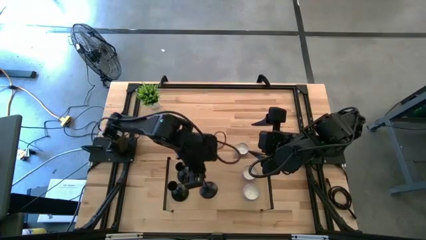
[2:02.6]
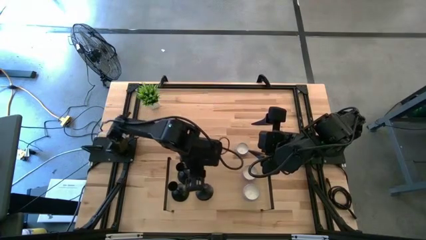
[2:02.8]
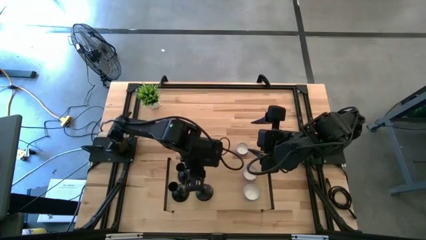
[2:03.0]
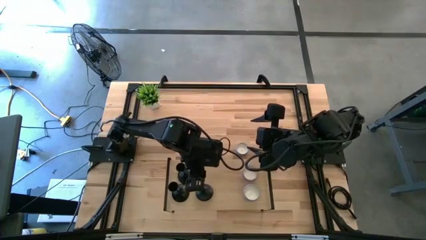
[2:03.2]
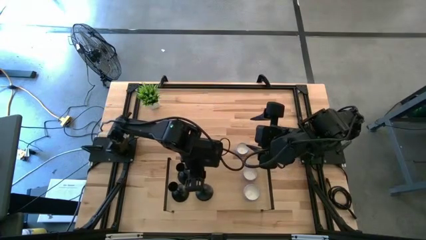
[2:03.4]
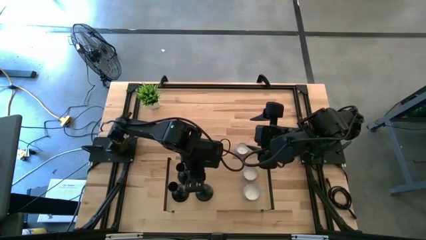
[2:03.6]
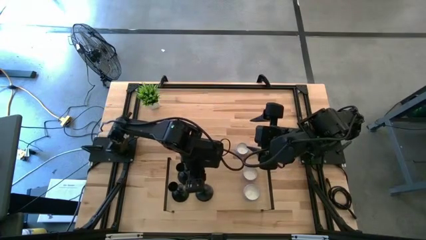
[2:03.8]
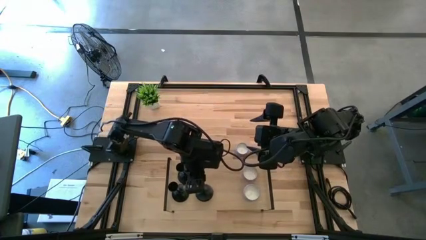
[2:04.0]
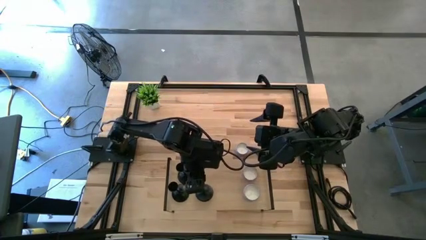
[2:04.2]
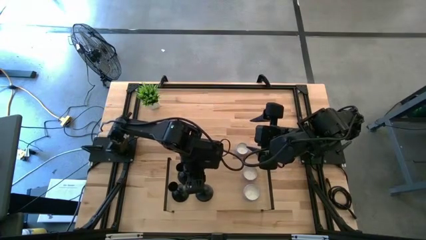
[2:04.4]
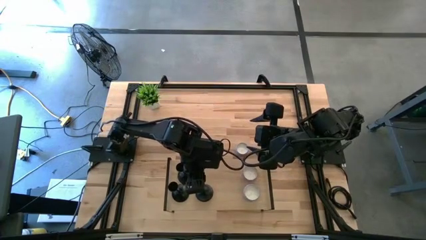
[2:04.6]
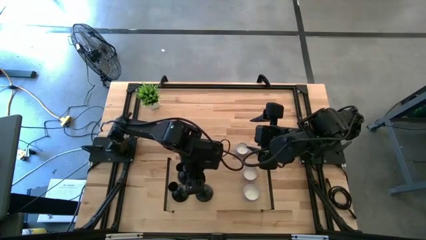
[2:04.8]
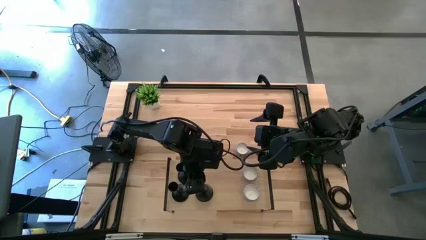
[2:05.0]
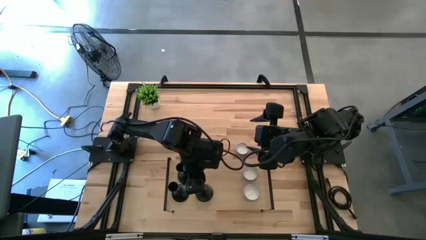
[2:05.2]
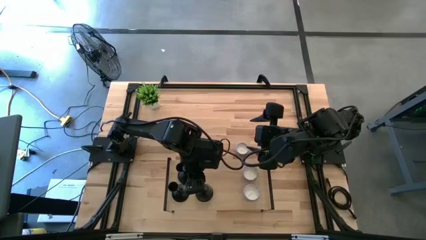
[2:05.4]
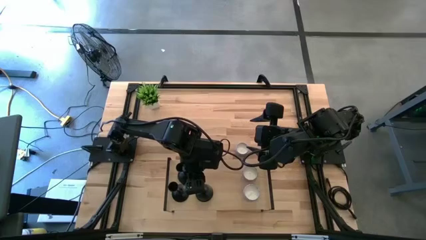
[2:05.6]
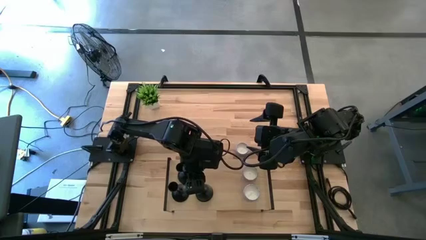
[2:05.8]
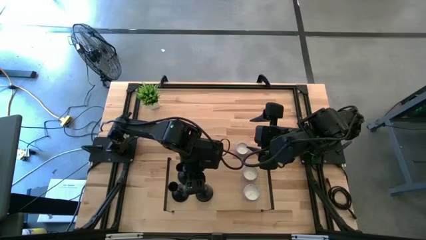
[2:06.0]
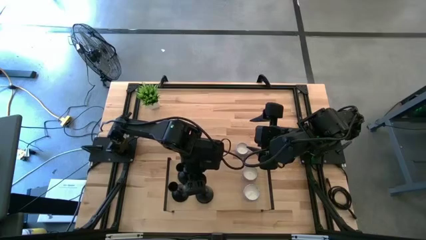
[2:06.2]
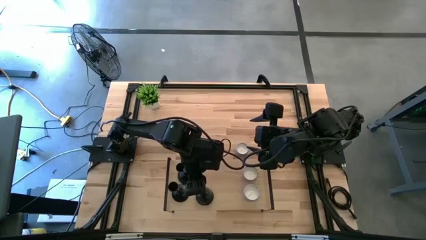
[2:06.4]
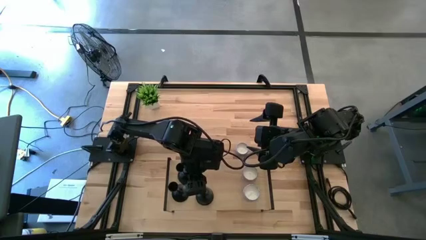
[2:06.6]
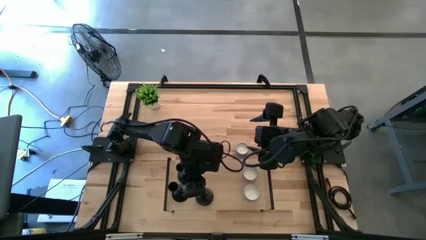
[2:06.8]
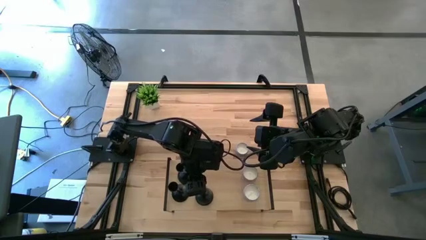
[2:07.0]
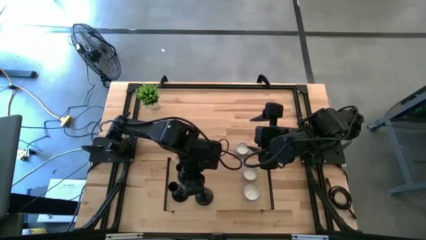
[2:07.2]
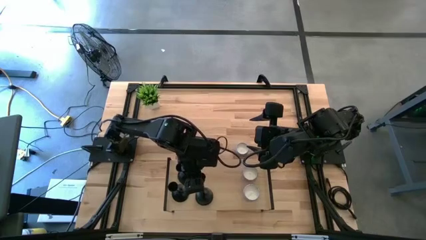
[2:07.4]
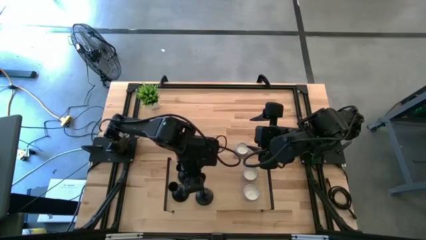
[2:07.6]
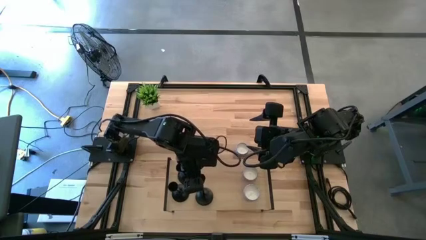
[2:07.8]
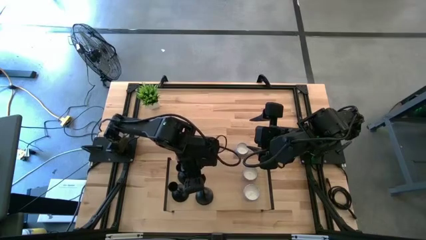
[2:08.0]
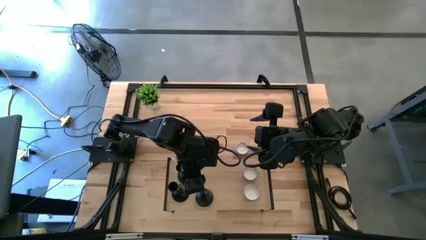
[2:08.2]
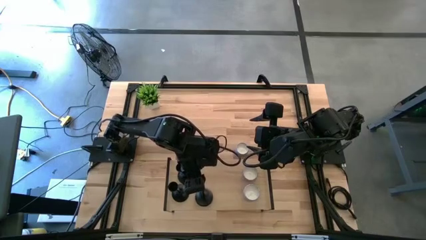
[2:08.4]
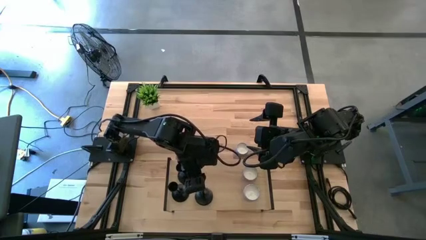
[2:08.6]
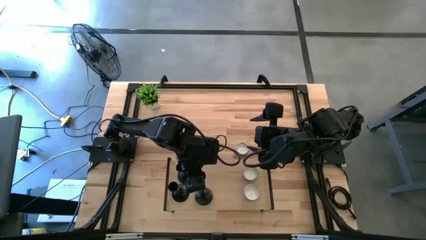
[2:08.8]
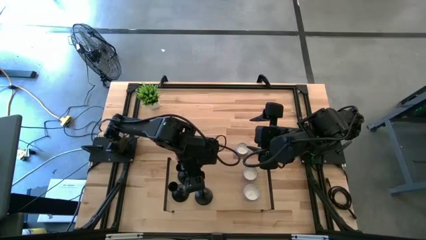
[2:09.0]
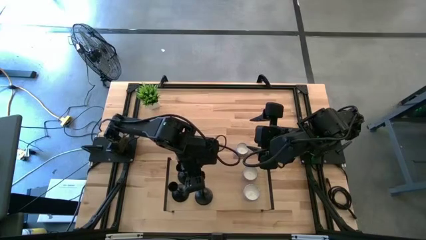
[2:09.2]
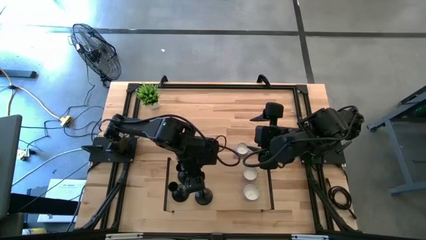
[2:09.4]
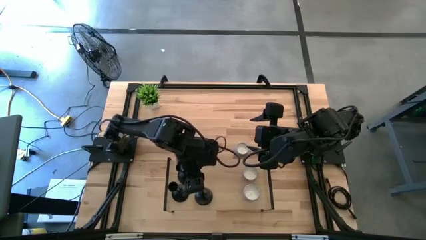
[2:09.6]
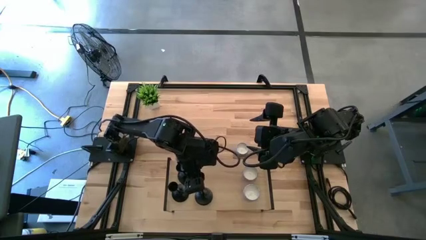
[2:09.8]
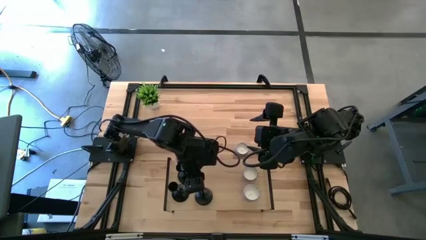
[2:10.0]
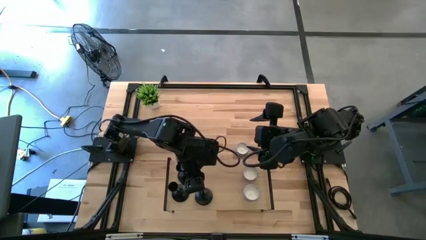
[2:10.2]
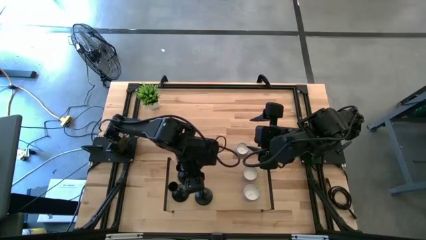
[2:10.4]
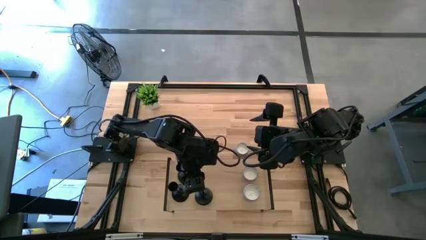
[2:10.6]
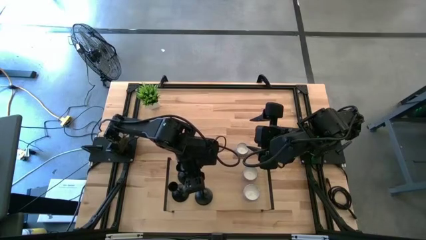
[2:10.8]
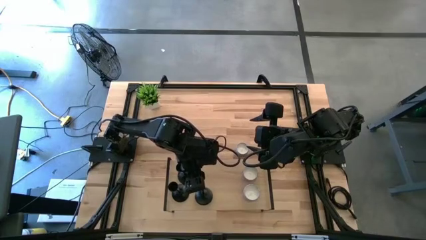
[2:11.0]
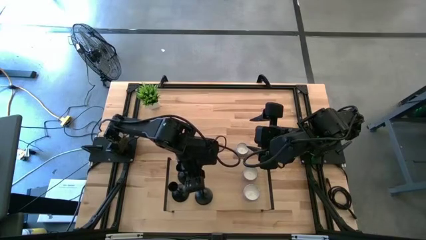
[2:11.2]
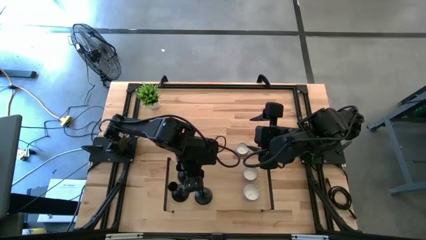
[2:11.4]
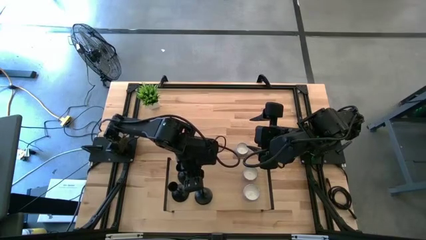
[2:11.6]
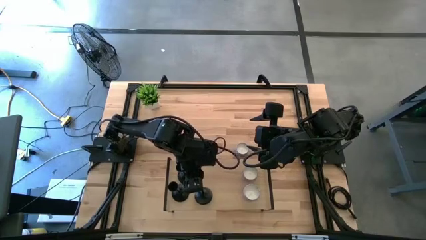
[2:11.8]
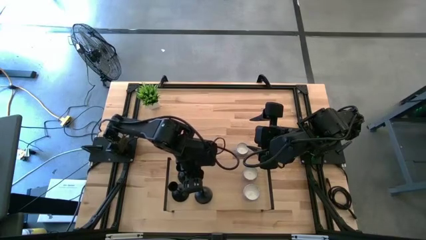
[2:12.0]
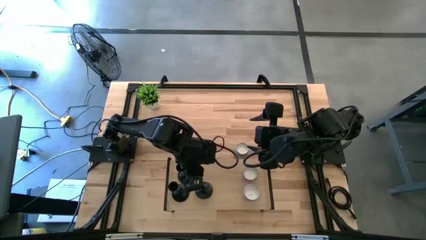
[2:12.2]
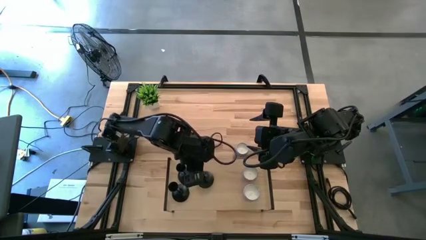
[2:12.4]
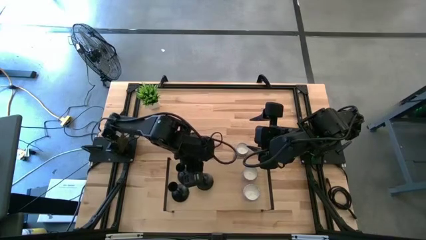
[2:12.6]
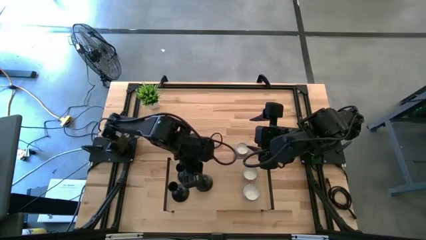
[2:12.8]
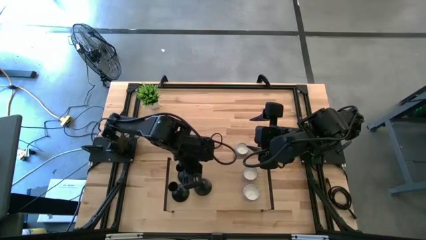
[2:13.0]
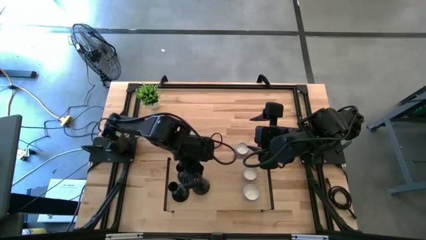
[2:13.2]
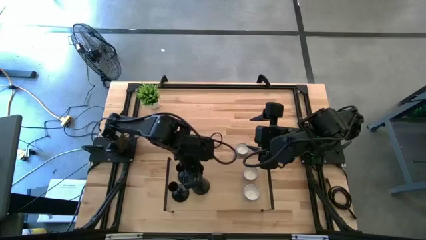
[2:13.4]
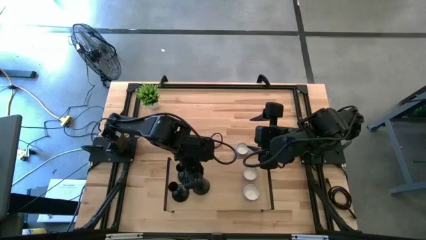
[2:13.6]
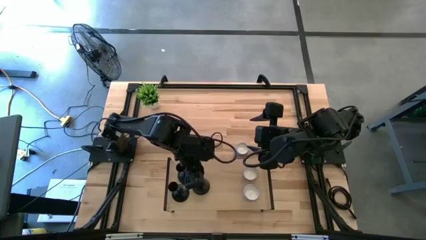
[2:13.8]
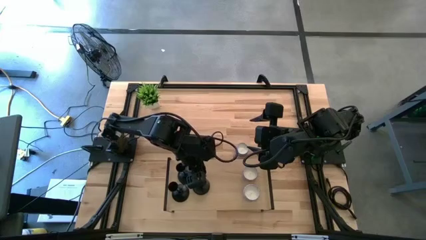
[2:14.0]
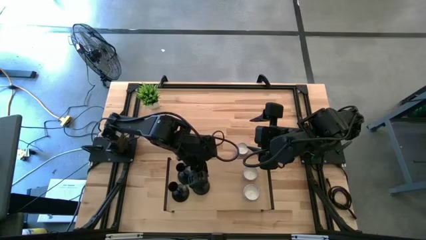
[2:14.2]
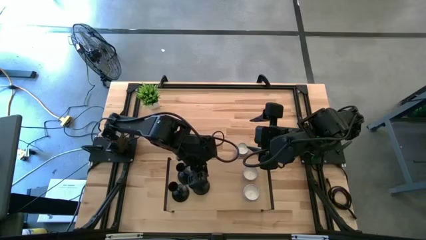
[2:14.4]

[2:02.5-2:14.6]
Task: Pick & Place candle stick holders
Put the black candle holder on the shelf
